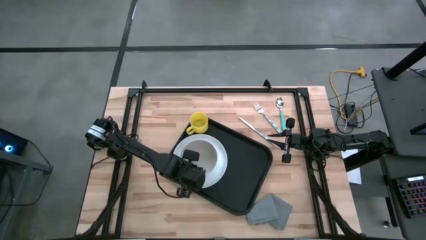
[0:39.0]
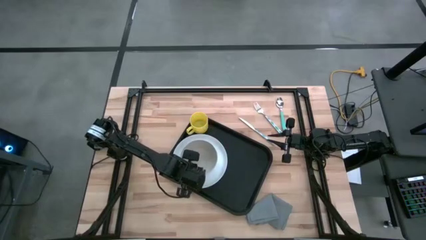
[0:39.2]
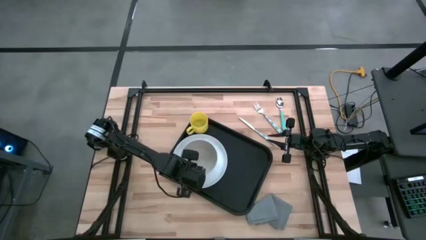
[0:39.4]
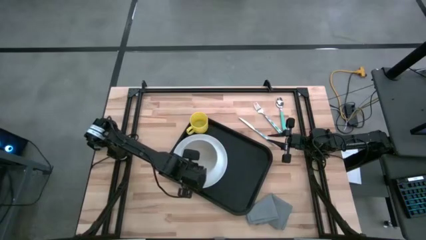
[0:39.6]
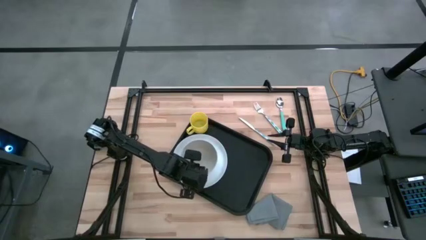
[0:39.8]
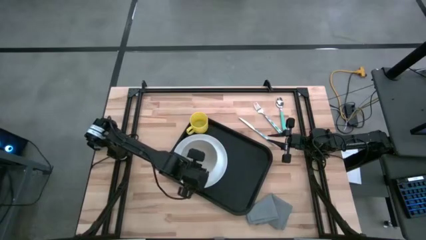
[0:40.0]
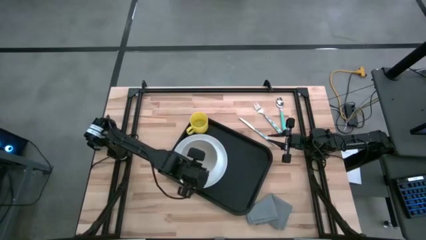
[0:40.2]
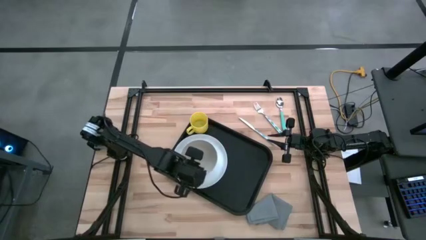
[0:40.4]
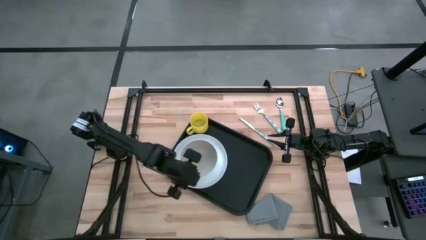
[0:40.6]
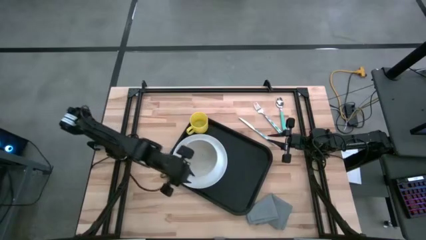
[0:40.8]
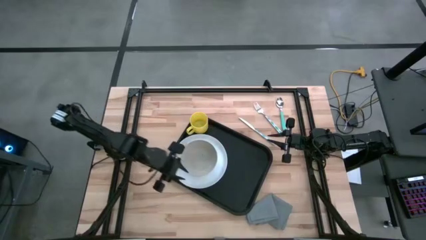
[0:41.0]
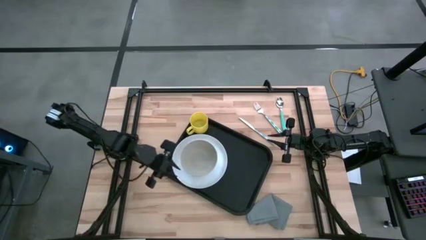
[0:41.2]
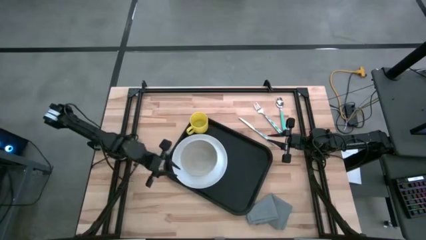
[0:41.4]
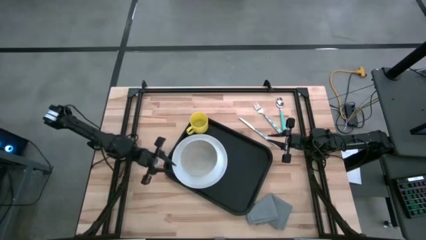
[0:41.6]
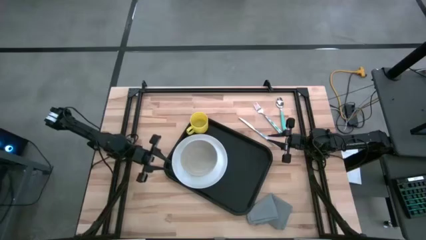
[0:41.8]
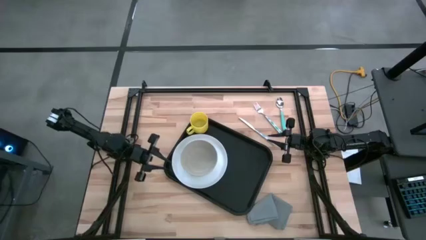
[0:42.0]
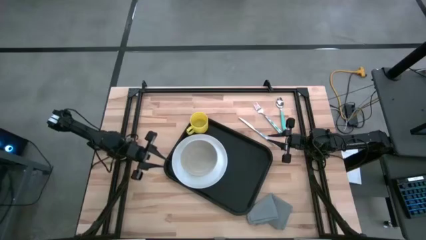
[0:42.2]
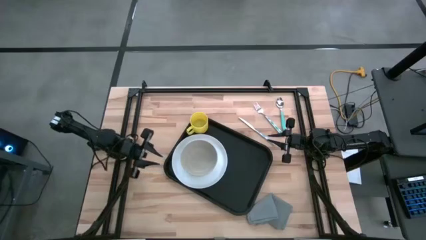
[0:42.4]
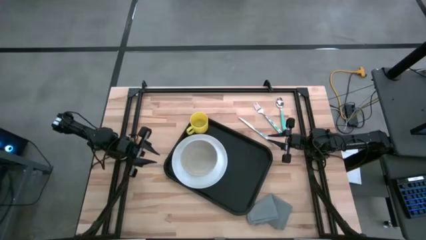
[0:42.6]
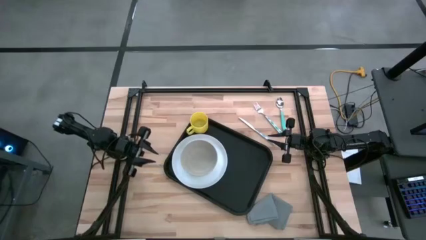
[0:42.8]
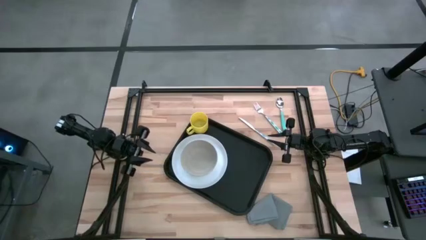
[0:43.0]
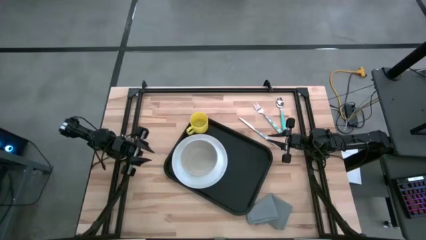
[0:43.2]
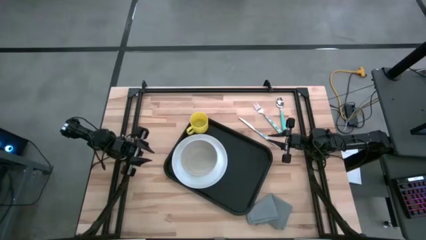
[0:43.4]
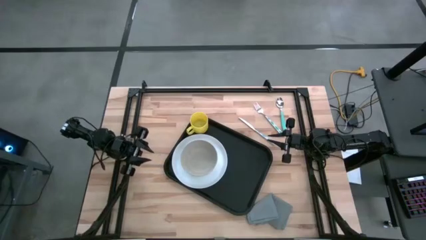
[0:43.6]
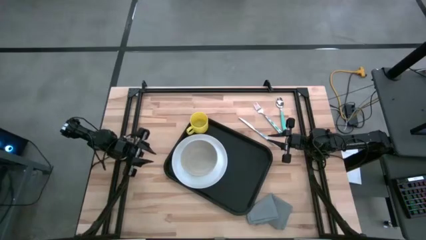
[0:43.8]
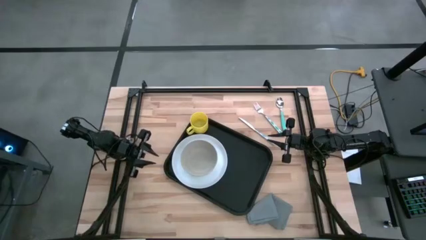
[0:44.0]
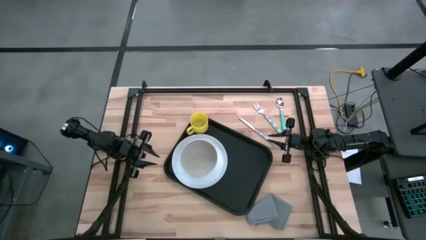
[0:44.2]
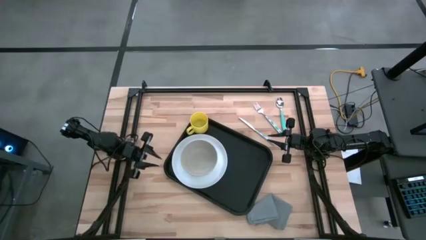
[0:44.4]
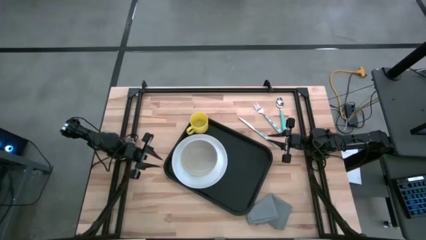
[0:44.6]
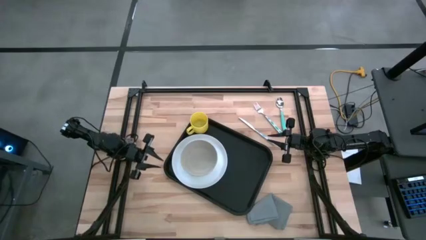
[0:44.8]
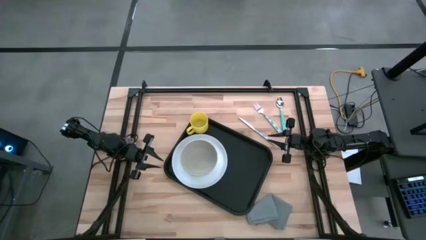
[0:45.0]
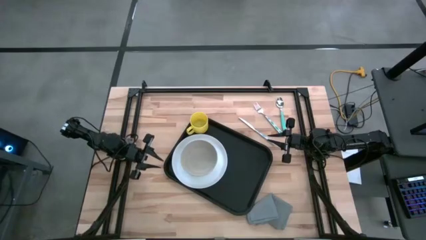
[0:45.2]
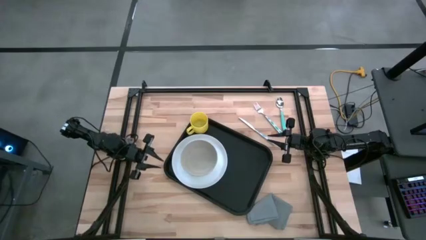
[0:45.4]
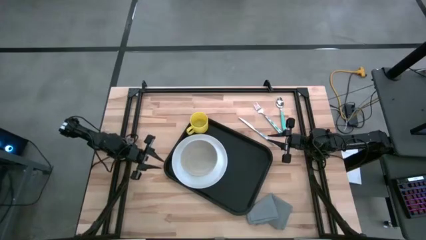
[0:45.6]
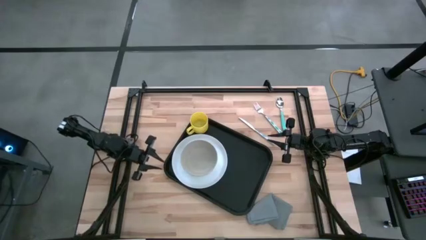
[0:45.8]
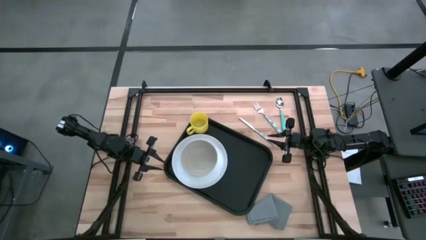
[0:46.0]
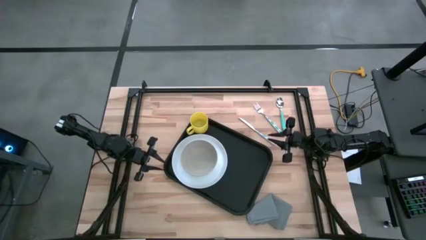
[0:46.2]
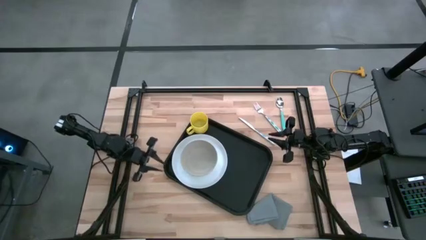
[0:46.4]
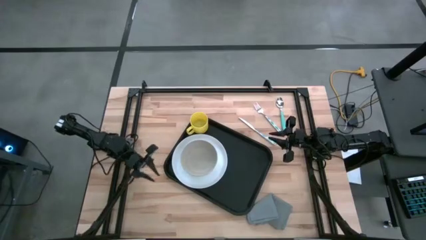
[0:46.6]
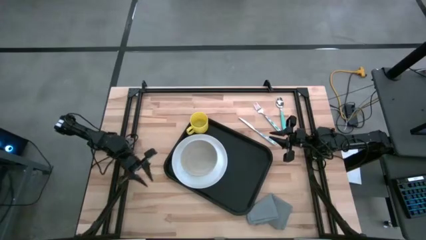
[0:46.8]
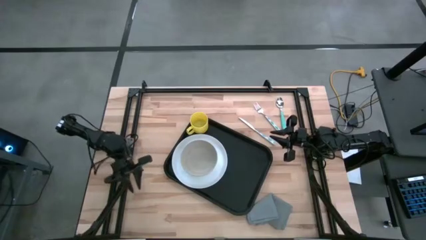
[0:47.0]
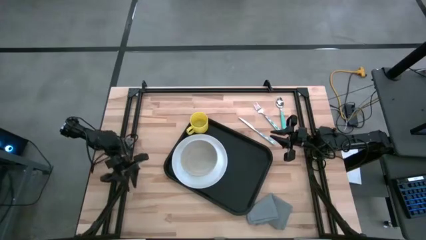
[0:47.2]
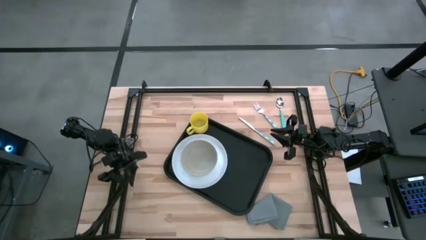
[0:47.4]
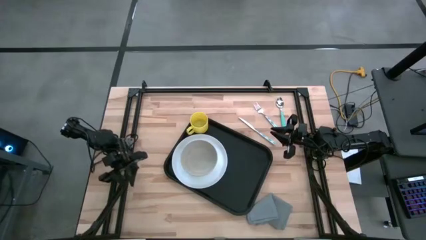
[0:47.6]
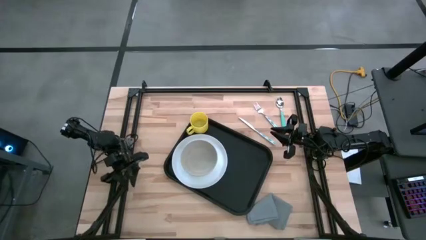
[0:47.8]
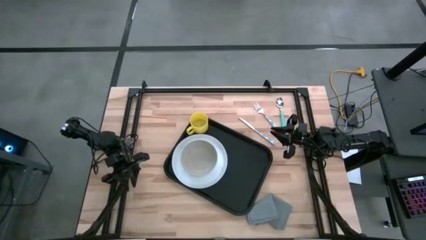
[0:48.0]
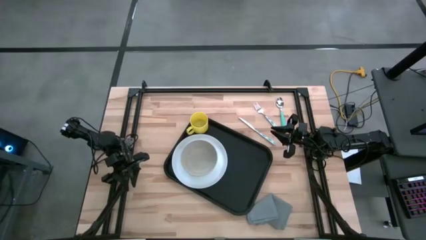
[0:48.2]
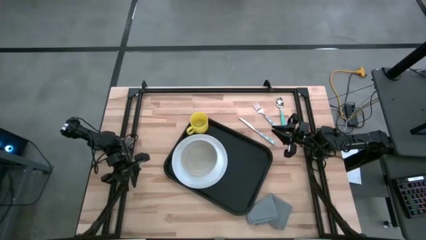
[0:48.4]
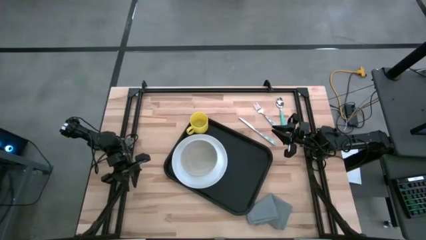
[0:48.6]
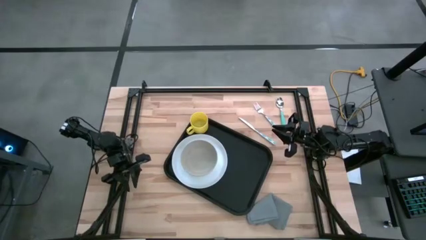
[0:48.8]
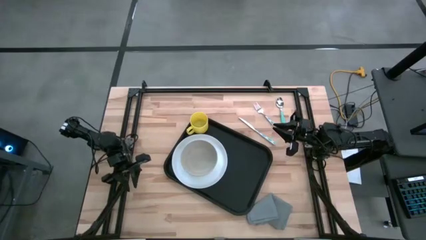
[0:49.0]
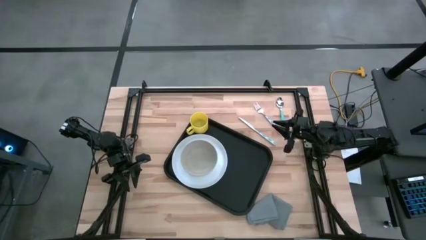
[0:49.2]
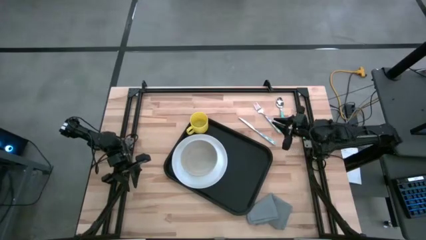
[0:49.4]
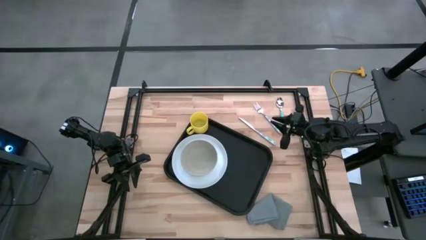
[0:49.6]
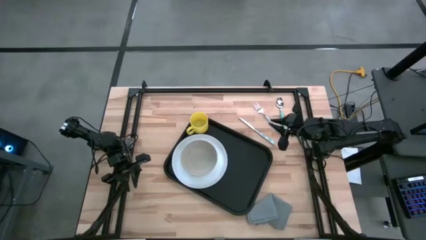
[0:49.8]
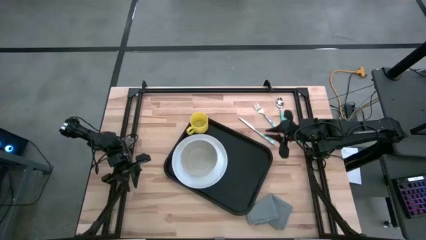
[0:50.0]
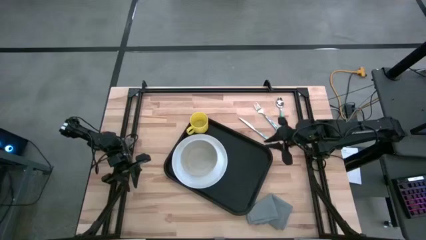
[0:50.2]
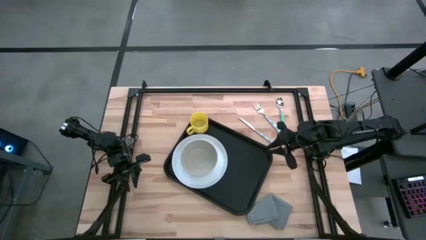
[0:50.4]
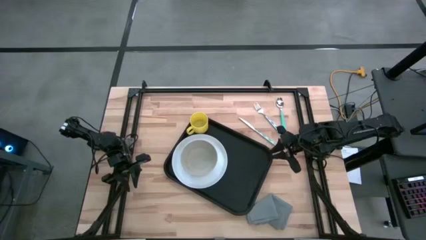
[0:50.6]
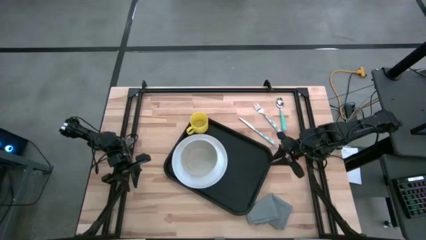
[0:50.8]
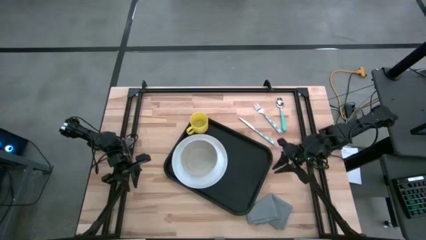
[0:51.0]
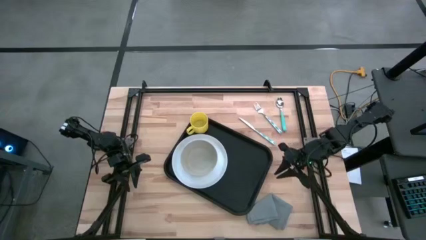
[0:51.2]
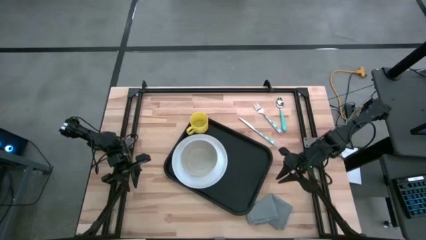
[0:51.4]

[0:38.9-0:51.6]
Task: Set up tray
Put the gray napkin on the black serving tray to the right of the white plate

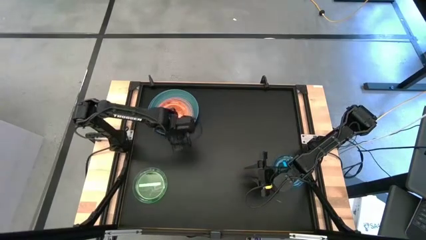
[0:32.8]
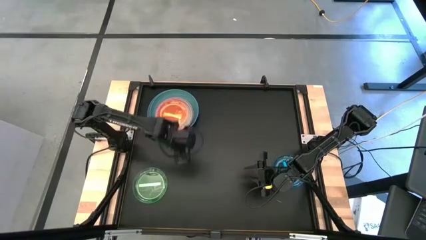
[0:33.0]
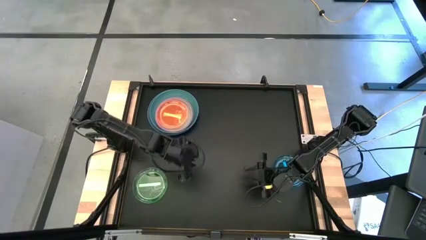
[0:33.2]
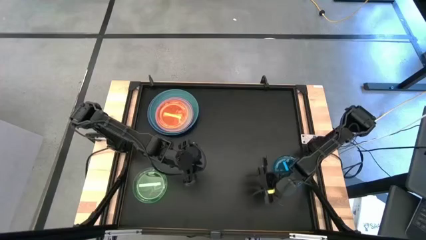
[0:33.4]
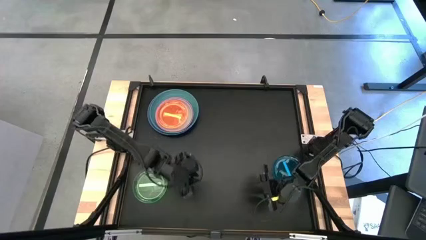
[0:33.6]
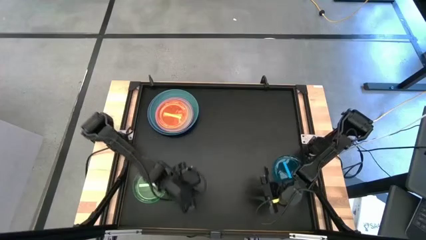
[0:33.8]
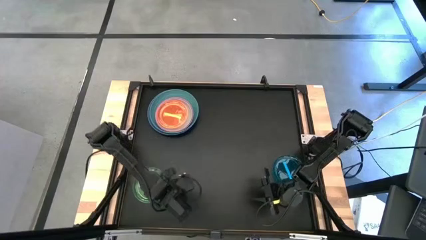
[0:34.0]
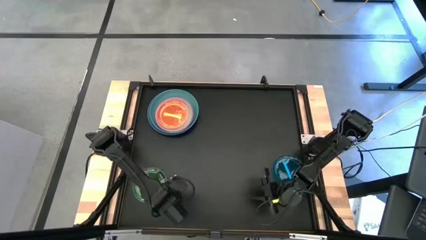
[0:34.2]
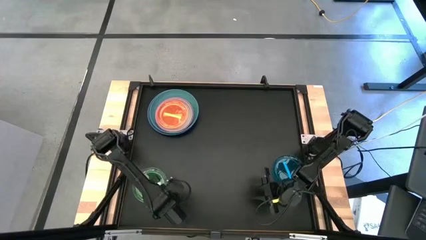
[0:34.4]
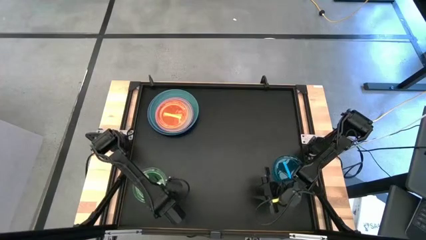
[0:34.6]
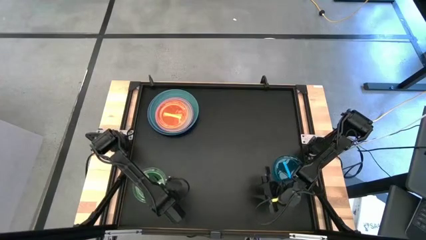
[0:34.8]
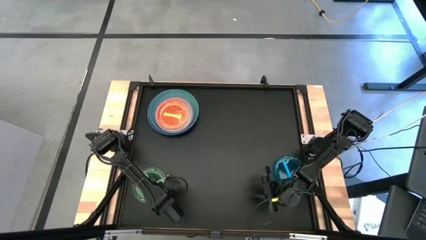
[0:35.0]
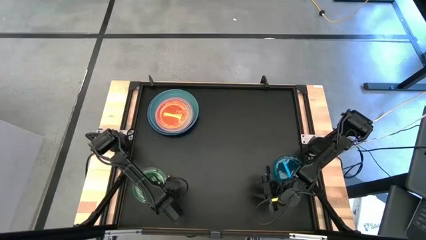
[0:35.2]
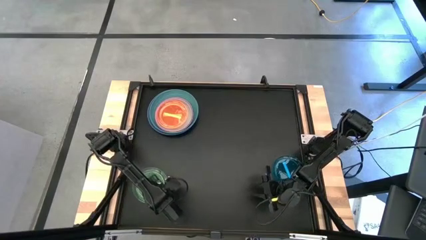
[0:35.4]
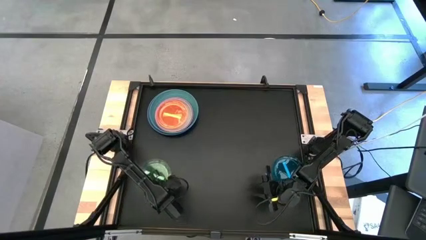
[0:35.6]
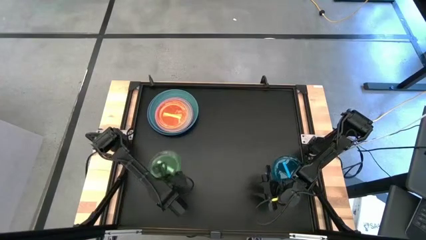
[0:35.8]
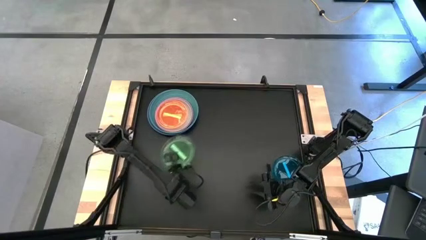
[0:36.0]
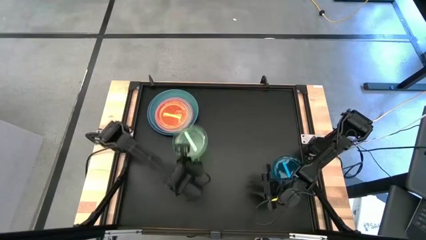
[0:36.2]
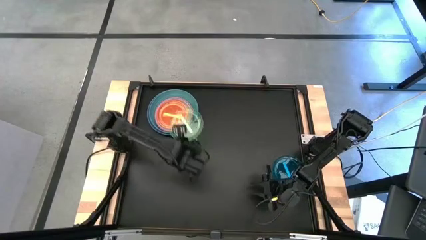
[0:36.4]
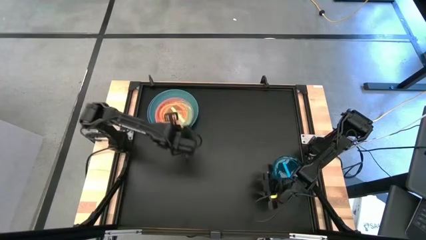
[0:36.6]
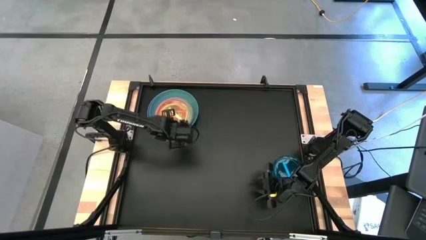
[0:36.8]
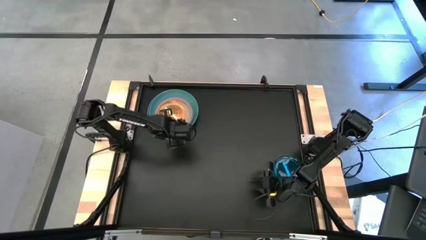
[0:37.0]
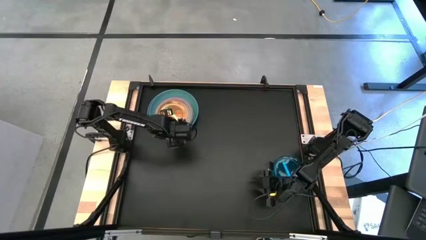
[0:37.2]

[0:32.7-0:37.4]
Task: Stack plastic plates
Stack the light green plate on the orange plate
